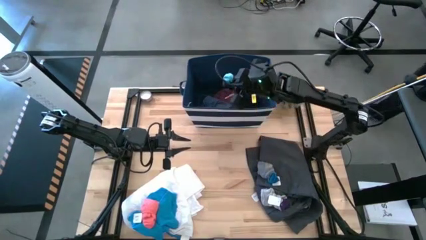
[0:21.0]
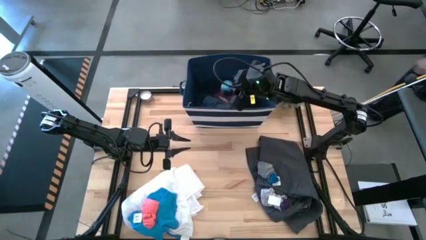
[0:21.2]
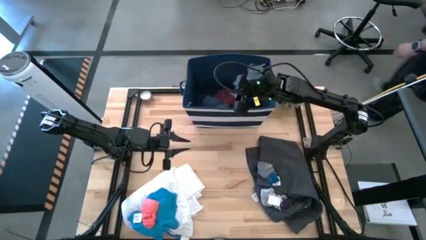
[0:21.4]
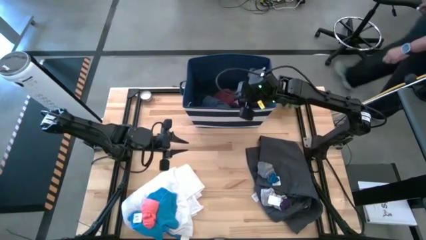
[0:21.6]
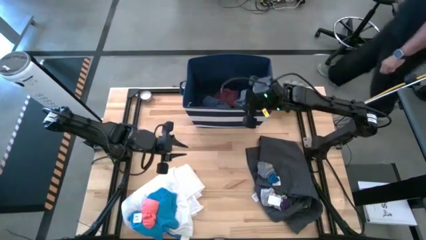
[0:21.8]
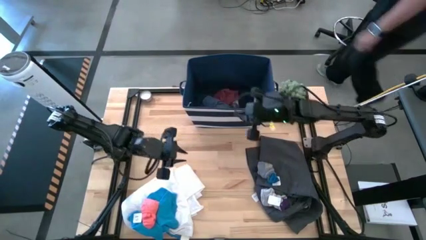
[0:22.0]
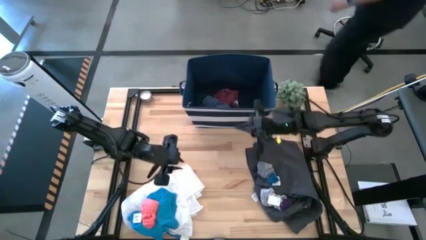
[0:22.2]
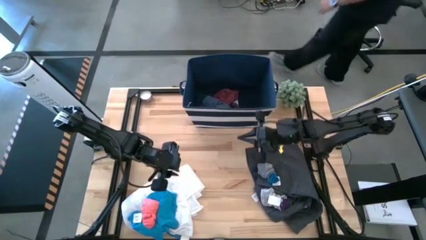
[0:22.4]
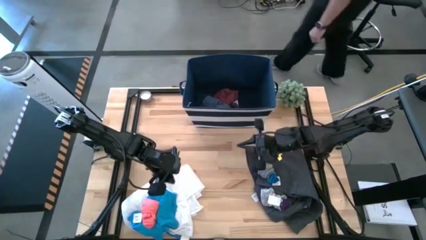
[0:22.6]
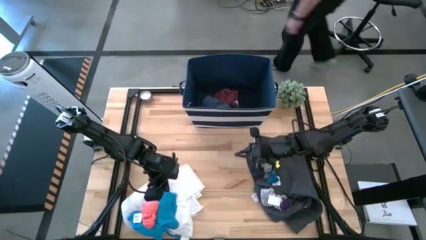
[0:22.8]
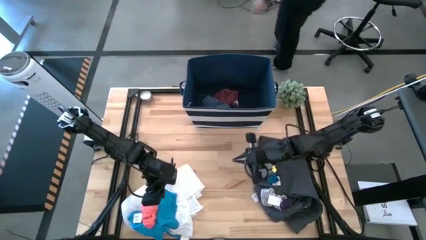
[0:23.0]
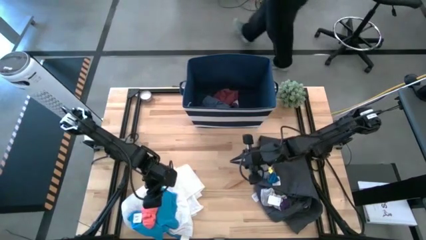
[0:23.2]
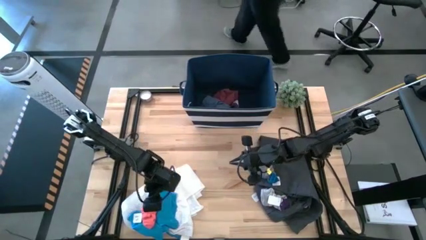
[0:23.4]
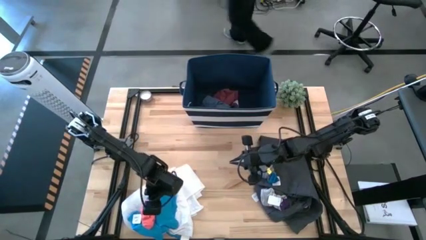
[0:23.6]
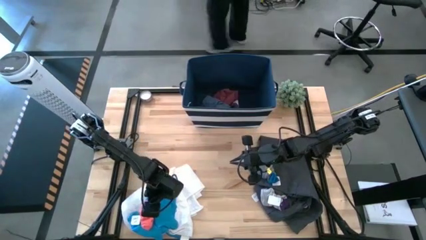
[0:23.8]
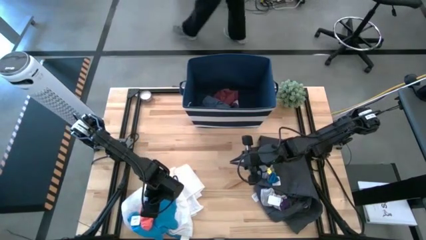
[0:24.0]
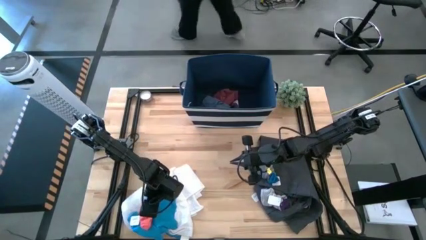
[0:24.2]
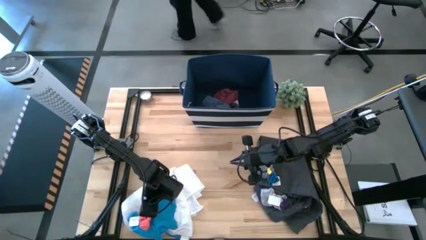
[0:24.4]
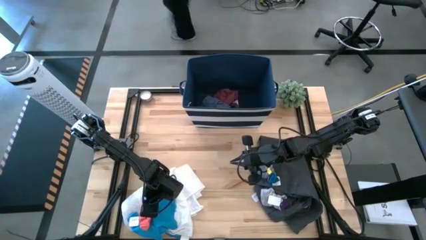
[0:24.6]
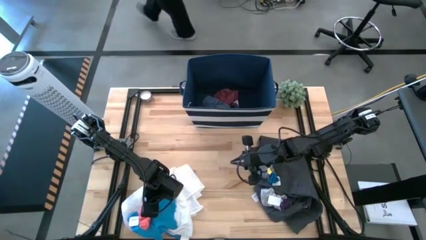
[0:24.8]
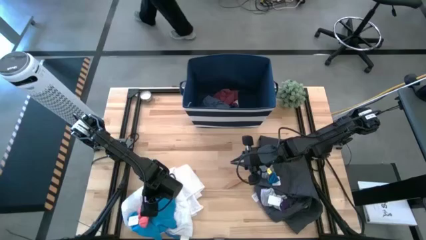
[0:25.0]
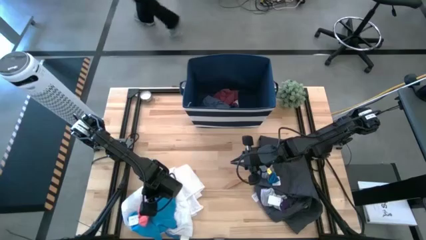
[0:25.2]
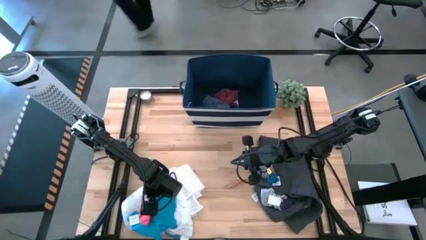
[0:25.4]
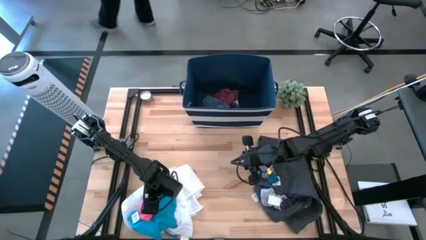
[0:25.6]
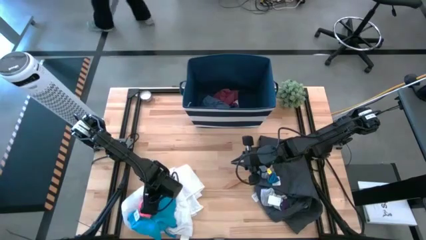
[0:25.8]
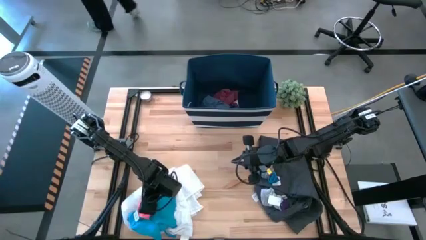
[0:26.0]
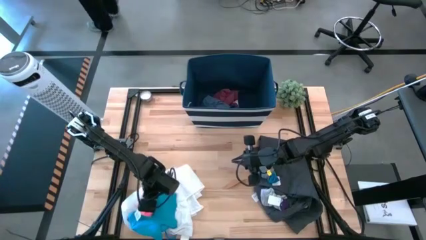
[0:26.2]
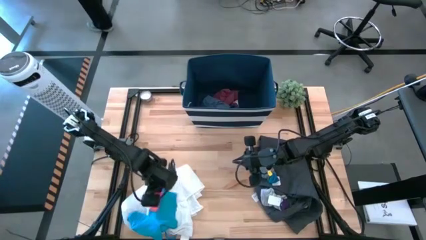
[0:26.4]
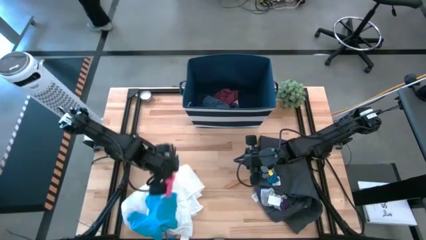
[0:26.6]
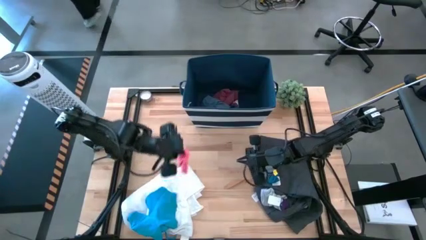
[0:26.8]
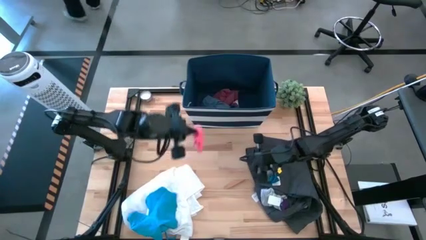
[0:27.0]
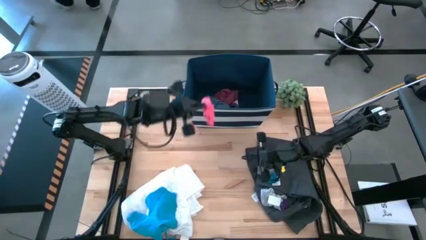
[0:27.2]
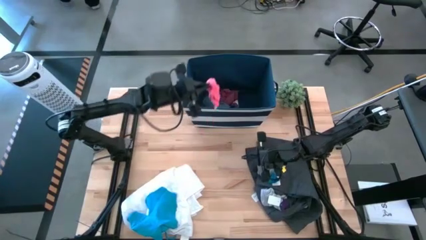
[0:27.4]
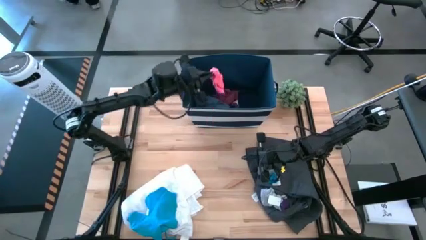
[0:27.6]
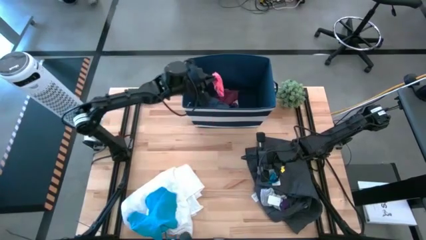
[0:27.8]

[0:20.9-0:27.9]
Task: Sort clothes
Put the pink sock into the blue bin

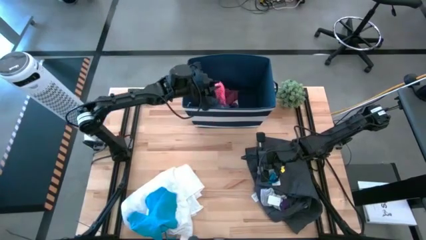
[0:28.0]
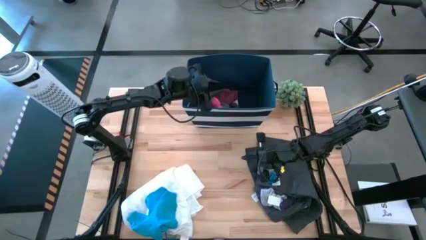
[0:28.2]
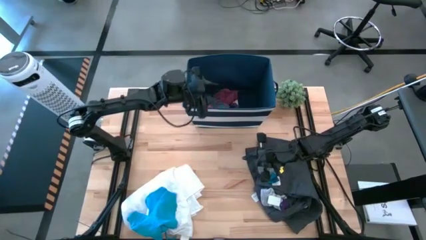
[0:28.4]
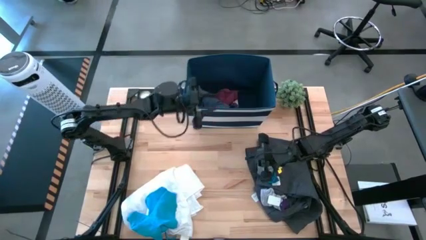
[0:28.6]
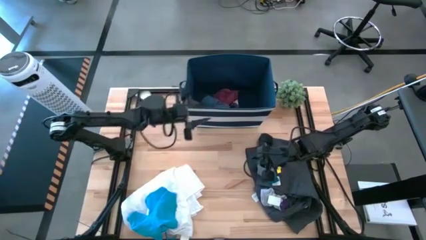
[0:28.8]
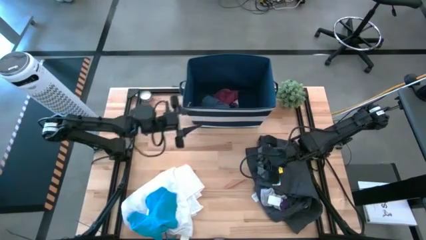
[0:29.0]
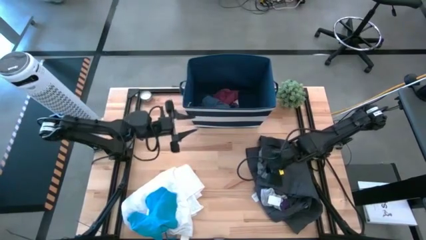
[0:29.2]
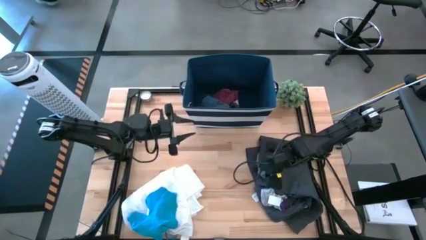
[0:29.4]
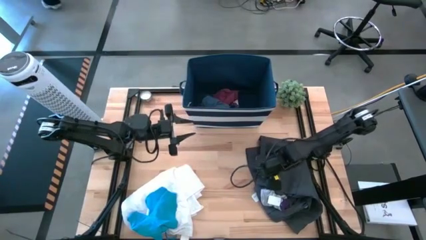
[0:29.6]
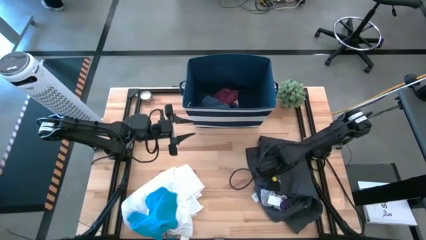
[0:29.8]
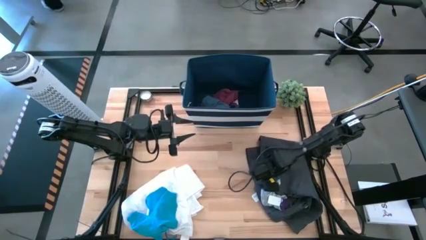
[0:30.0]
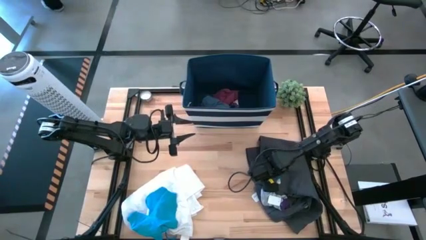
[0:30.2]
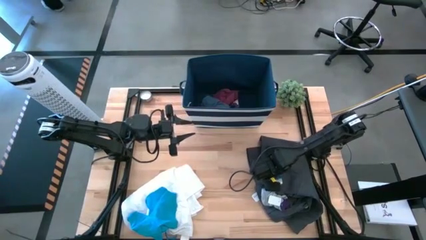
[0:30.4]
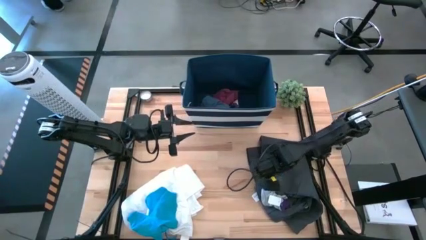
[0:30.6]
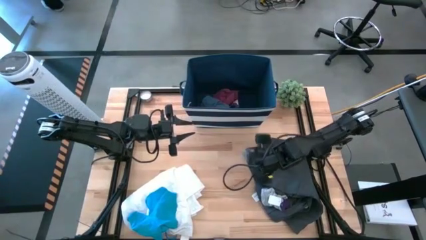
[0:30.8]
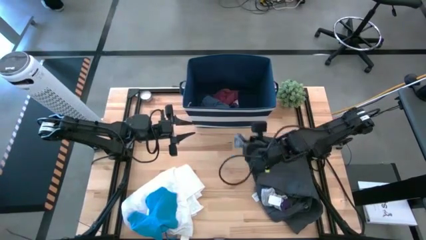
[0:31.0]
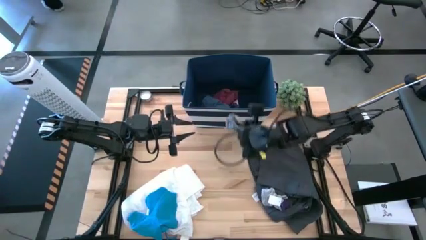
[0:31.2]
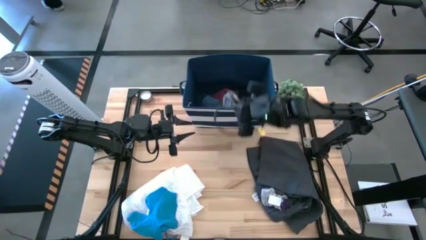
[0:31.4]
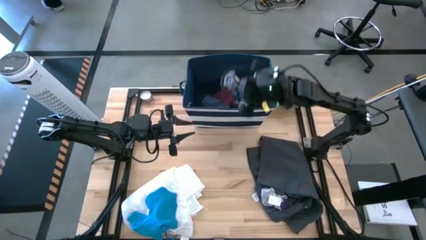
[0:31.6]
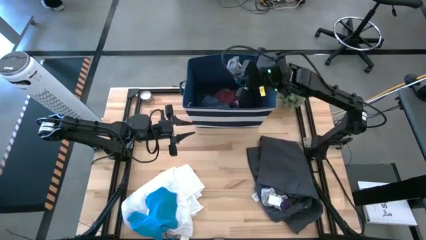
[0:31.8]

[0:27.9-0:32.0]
Put the blue sock into the blue bin

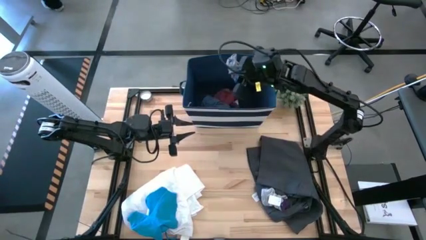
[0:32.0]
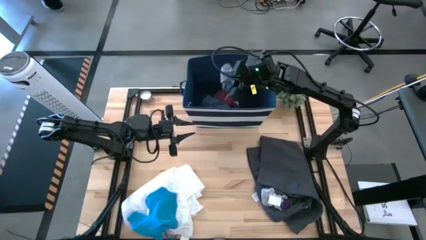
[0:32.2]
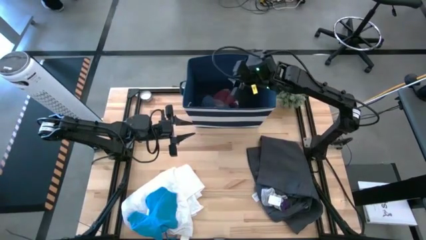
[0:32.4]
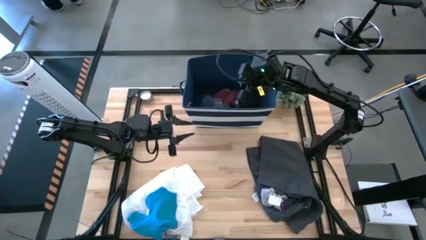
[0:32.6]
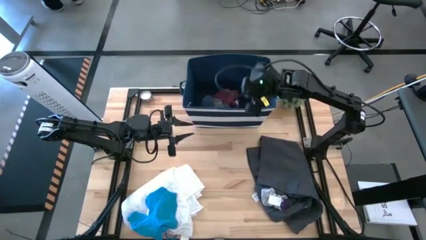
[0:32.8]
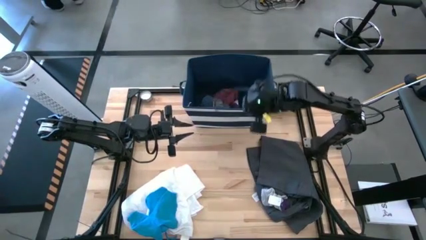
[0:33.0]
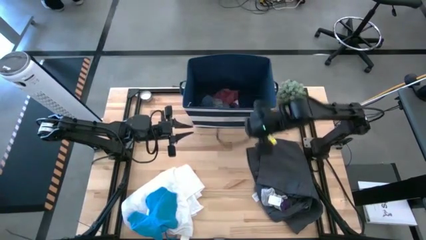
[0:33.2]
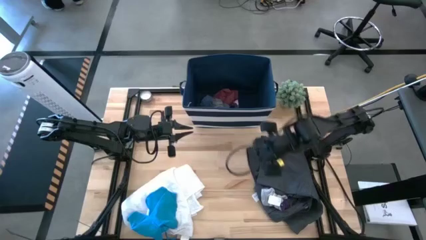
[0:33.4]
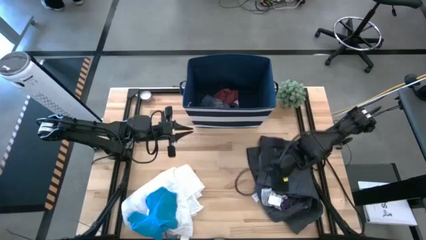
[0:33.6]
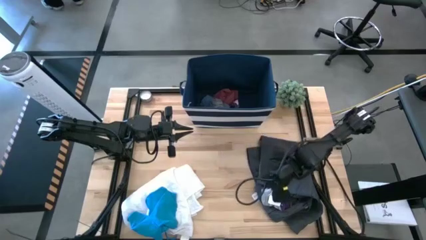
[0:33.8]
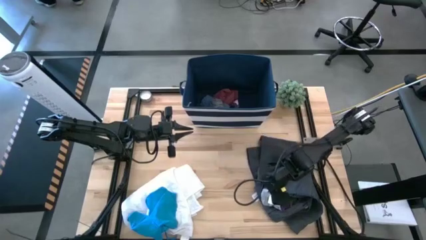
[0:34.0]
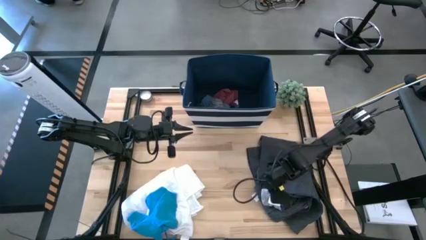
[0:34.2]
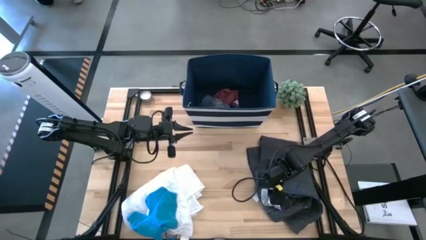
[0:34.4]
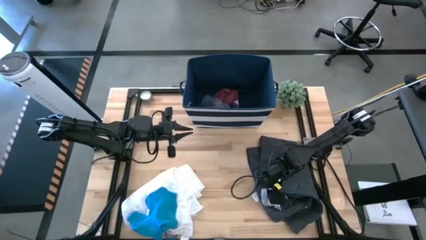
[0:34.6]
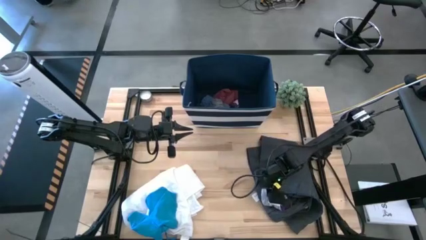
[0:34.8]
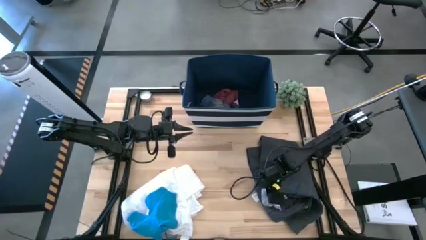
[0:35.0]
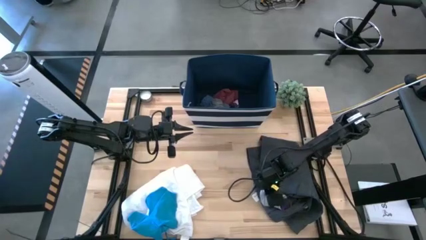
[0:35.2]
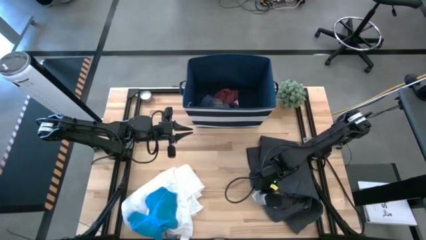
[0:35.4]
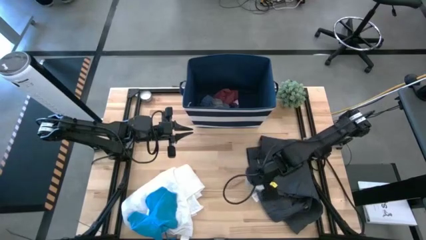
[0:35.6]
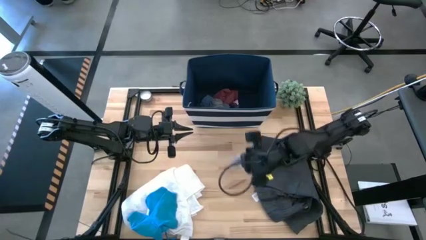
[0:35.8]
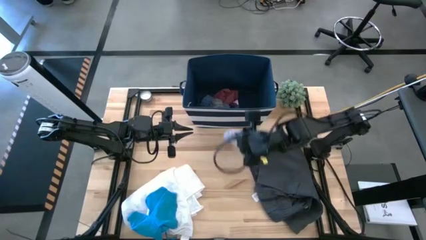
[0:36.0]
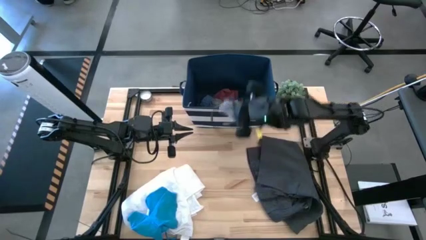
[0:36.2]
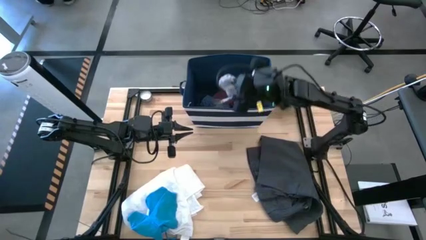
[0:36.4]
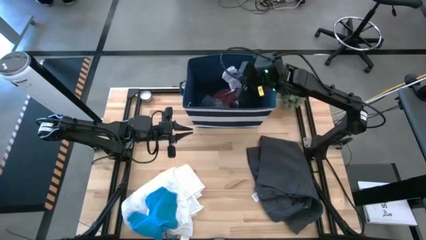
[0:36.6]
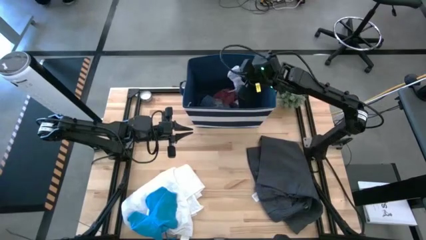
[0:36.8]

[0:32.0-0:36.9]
Put the gray sock into the blue bin

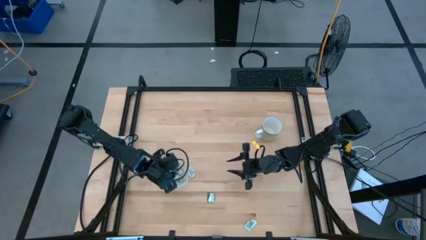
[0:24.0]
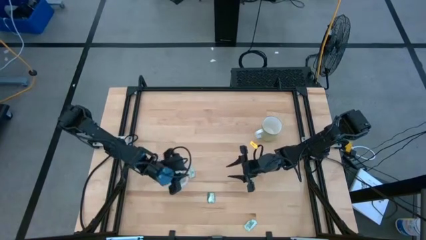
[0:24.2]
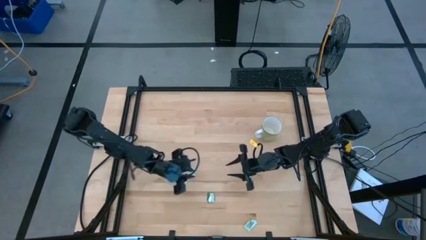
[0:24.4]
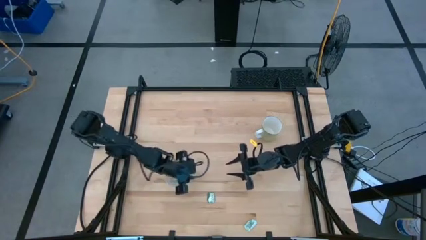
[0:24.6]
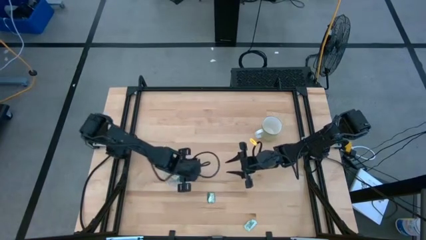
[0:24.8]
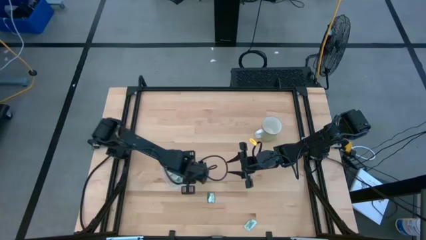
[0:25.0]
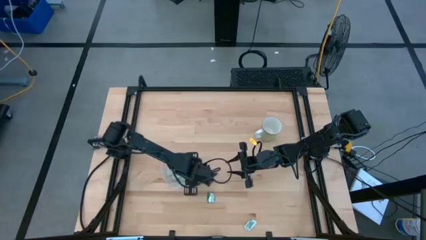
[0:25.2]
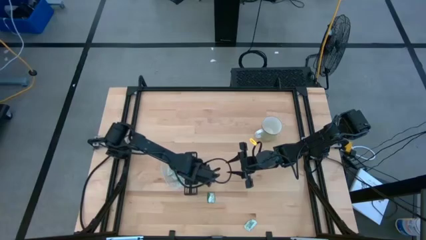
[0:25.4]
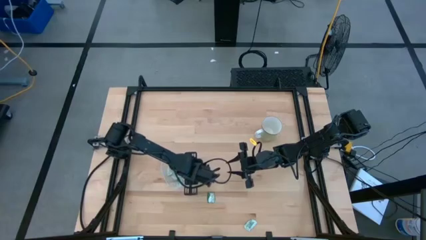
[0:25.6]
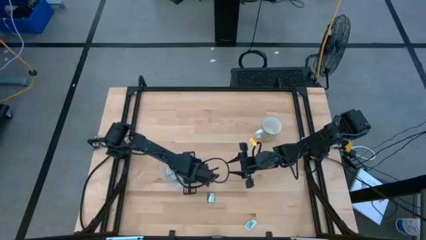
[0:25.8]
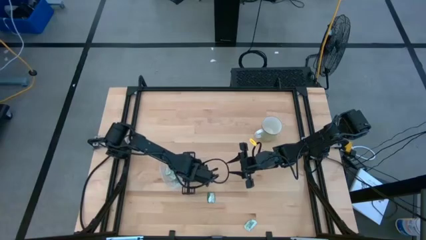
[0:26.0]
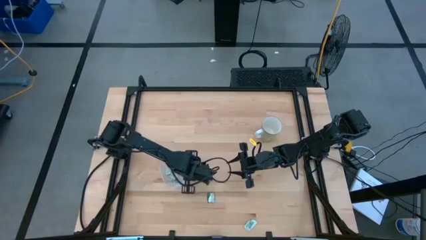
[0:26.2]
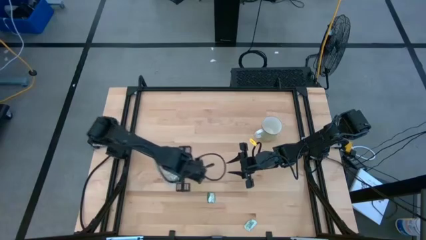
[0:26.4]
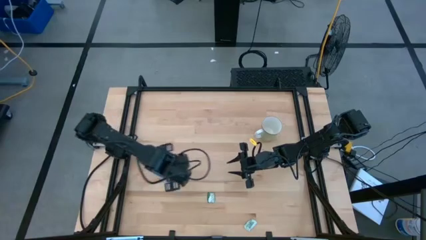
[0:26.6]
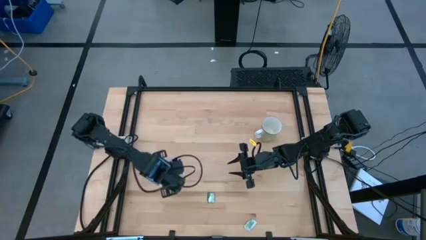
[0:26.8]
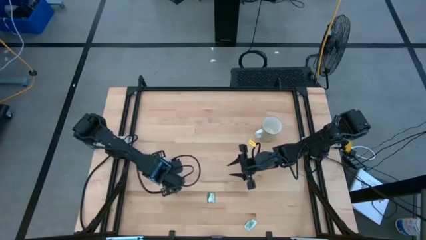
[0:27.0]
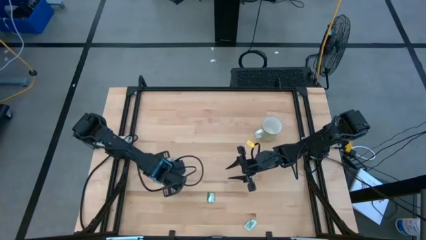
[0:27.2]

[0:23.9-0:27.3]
Task: Pick and place Stevia / Truvia into bins
Put the green stevia packet into the transparent bin
